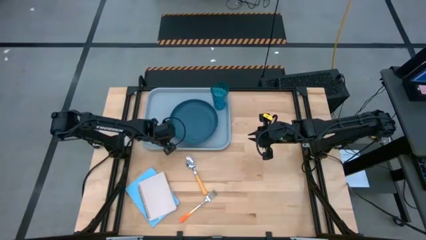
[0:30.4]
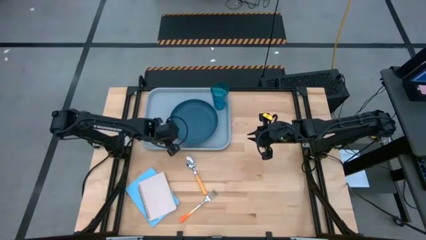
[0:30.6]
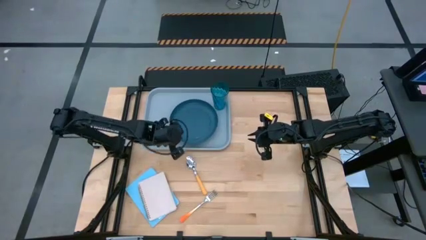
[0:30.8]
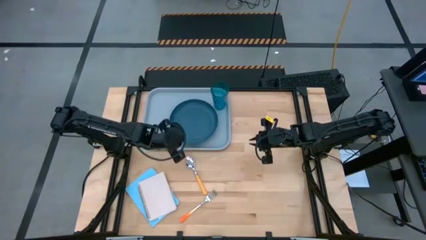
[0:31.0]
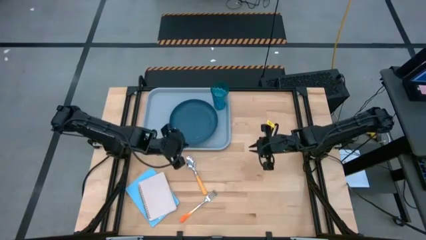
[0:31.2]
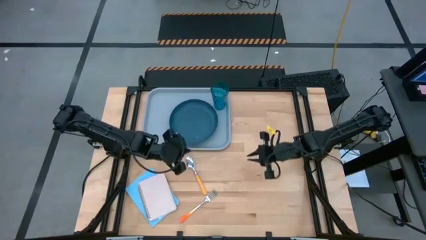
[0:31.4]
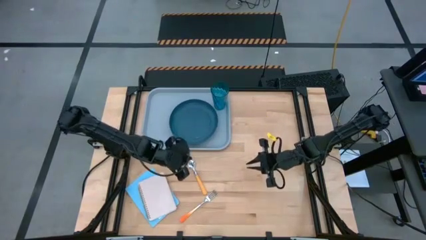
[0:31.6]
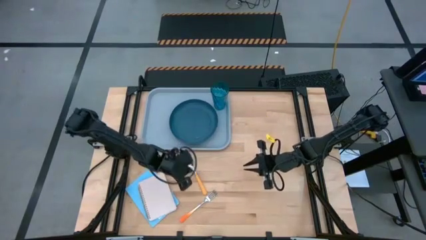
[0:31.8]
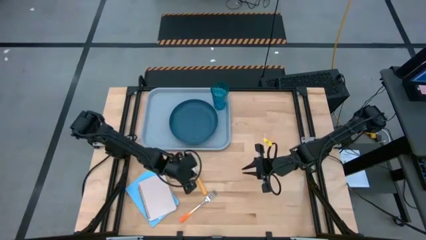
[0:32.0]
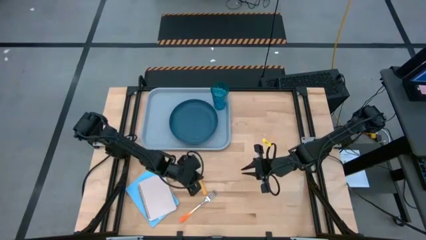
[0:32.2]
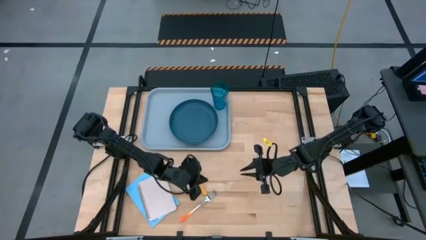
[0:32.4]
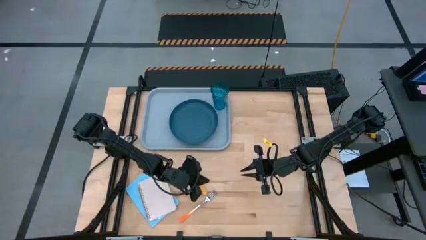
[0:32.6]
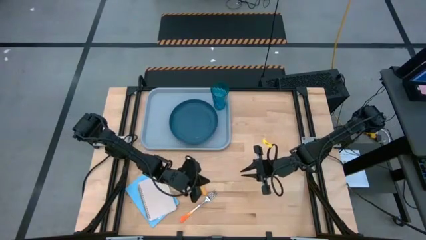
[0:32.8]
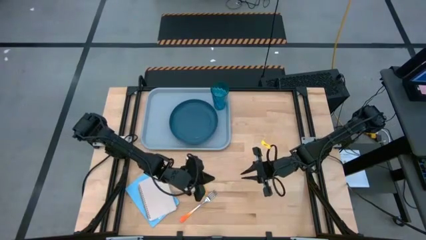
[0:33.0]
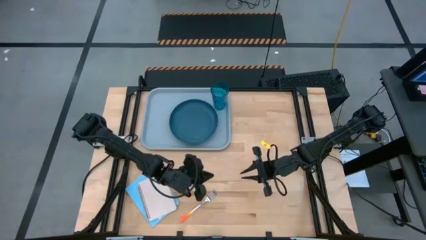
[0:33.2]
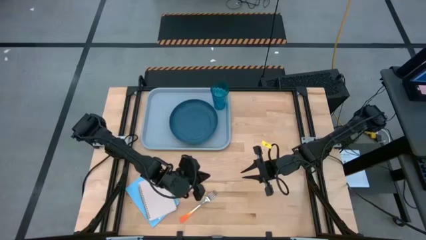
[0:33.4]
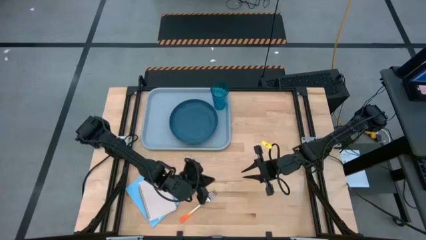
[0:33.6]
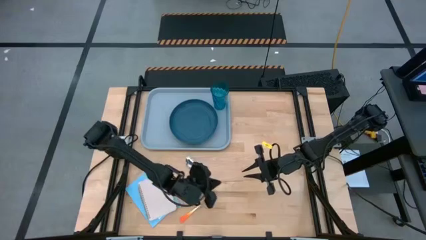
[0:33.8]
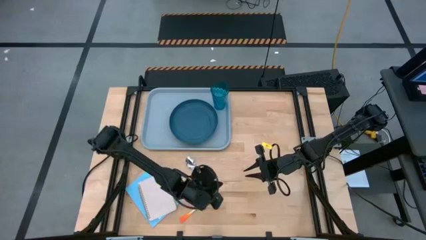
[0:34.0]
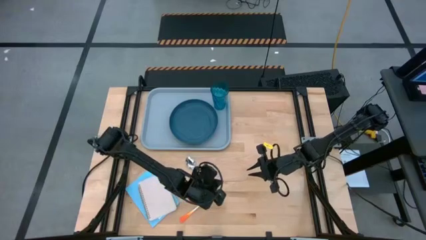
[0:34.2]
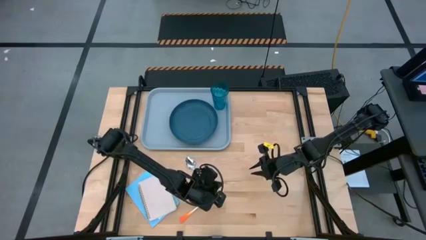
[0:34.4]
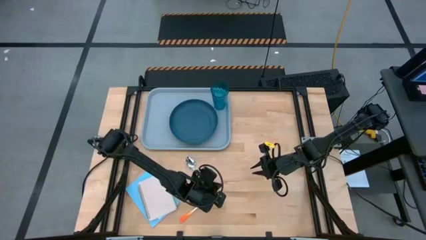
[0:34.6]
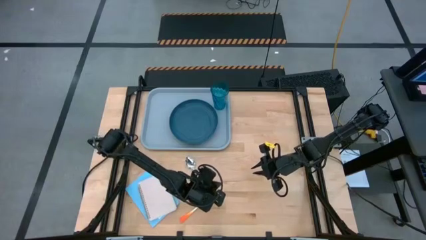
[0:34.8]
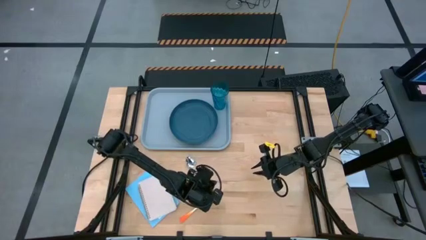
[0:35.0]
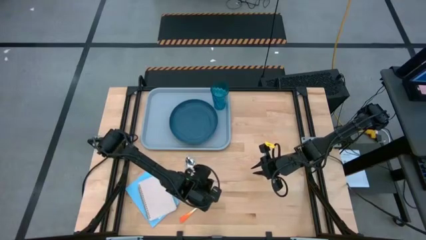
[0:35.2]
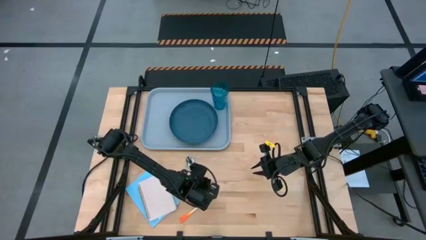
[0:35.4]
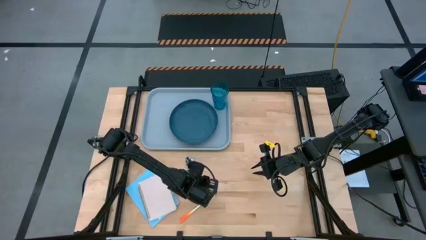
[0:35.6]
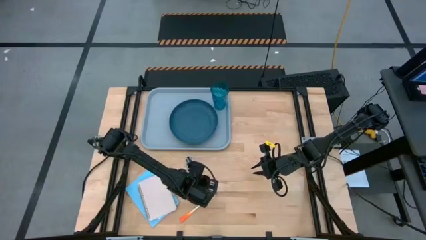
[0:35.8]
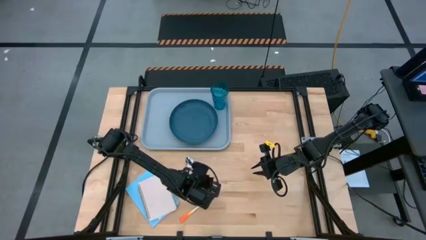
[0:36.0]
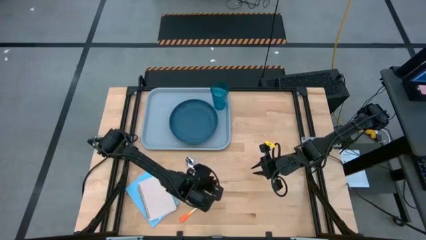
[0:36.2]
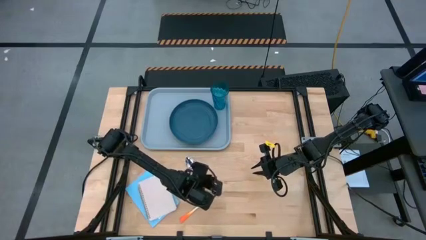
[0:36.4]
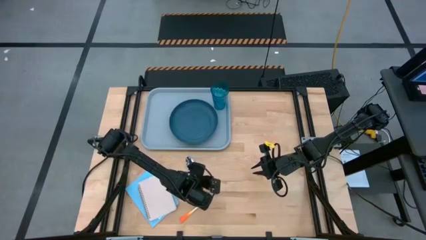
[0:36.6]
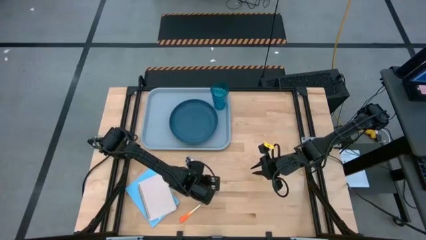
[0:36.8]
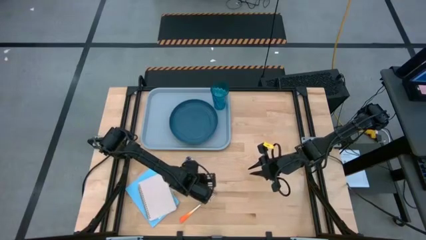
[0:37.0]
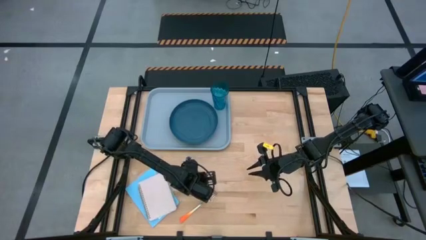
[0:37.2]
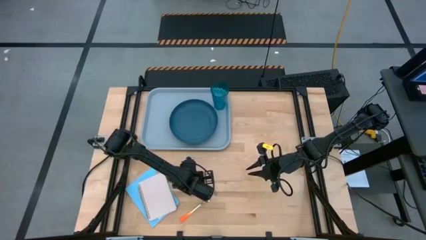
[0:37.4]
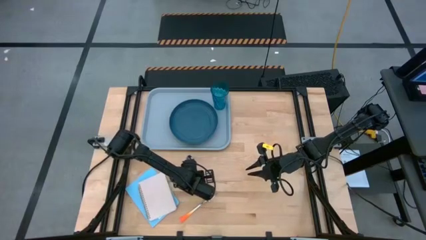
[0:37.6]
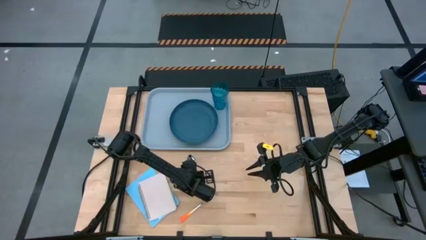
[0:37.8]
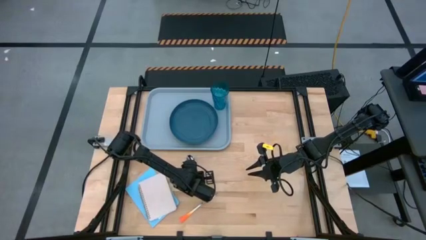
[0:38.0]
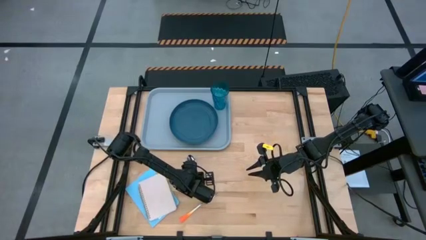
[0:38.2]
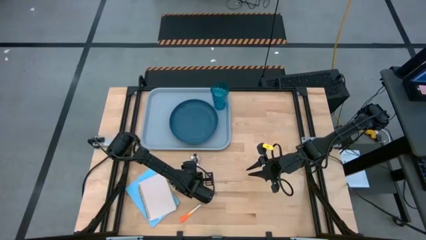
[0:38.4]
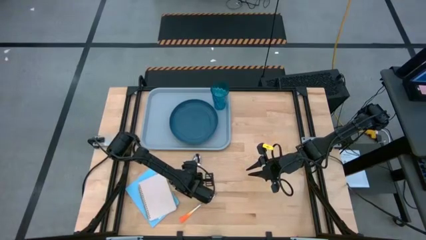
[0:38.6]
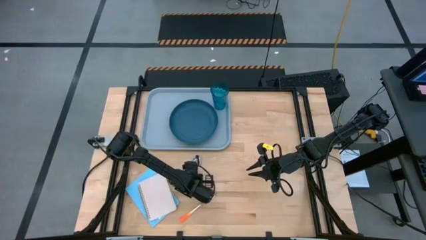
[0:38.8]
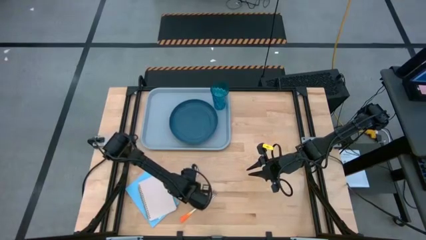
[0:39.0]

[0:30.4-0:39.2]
Task: Pick and place plate/cup/fork/spoon on tray
Put the yellow spoon on the light blue tray to the left of the blue plate

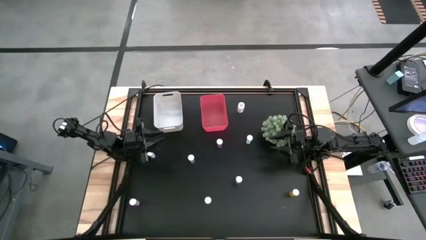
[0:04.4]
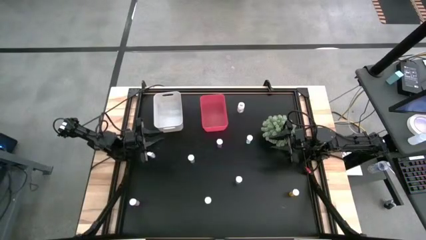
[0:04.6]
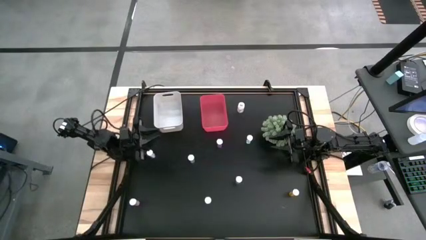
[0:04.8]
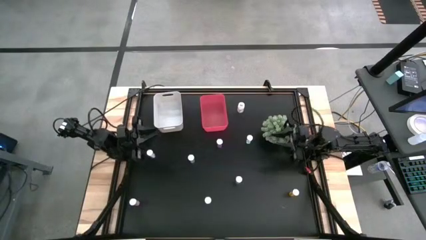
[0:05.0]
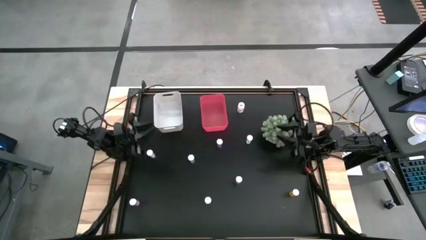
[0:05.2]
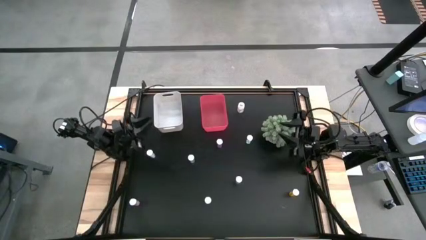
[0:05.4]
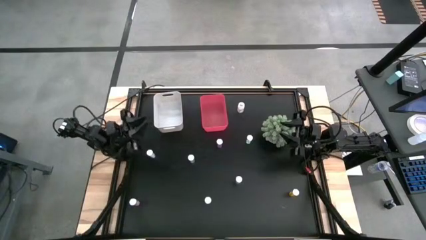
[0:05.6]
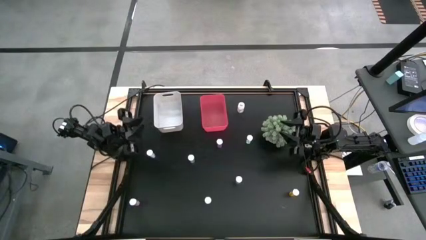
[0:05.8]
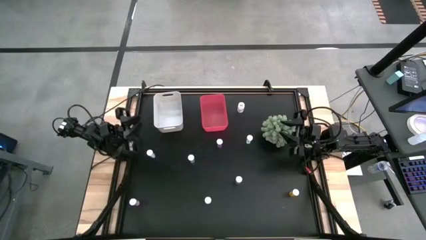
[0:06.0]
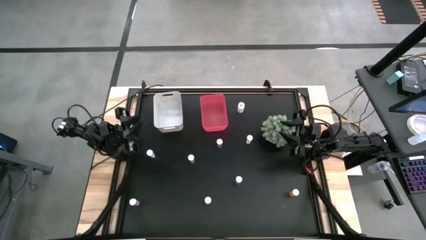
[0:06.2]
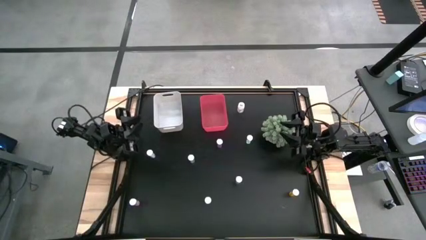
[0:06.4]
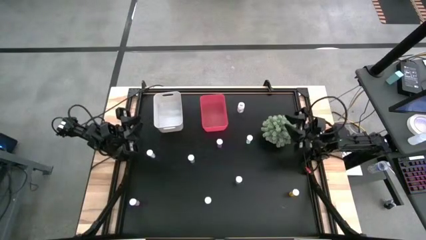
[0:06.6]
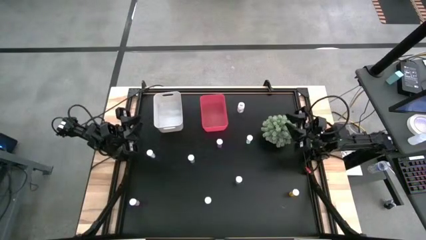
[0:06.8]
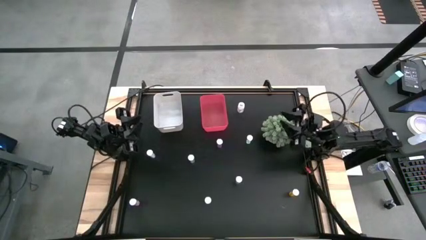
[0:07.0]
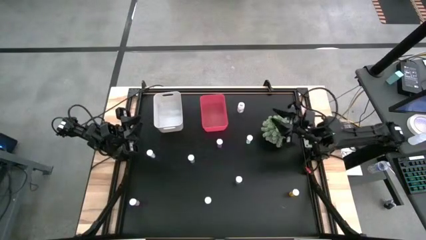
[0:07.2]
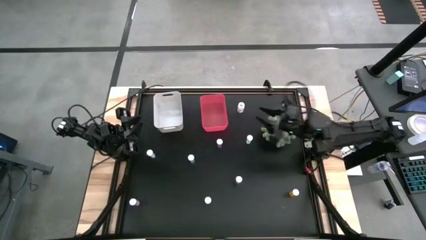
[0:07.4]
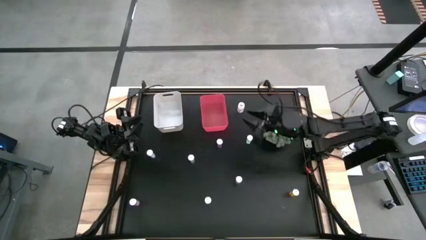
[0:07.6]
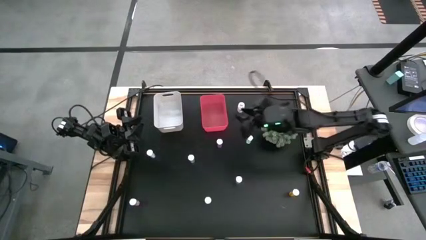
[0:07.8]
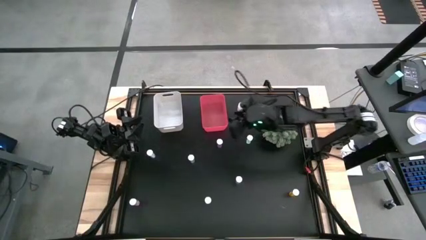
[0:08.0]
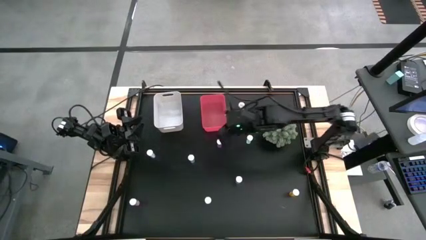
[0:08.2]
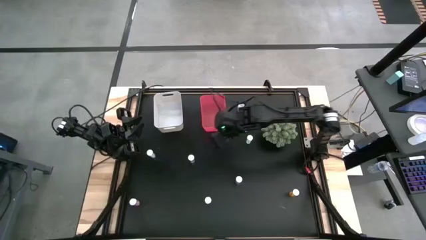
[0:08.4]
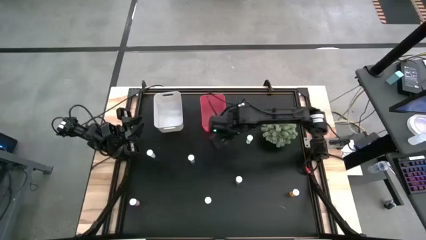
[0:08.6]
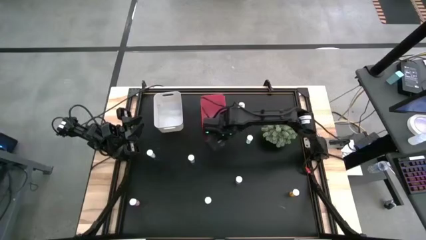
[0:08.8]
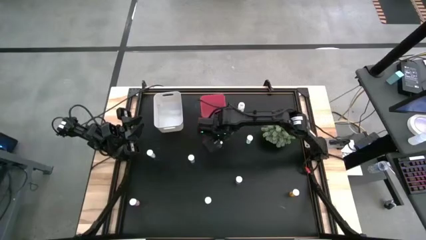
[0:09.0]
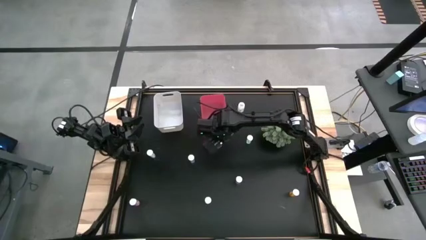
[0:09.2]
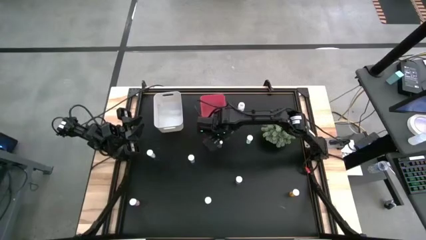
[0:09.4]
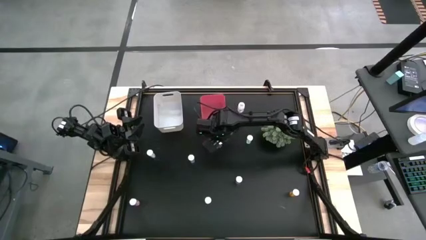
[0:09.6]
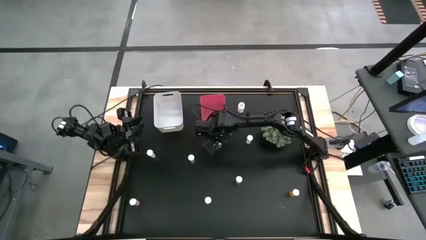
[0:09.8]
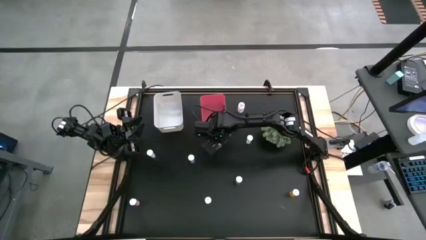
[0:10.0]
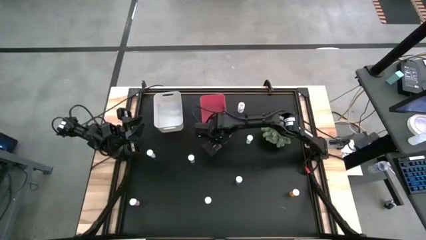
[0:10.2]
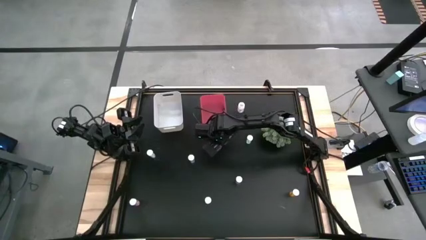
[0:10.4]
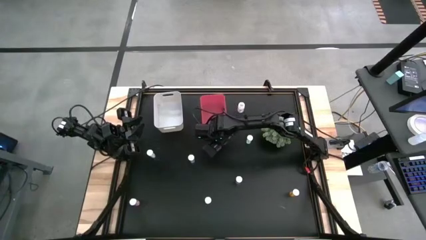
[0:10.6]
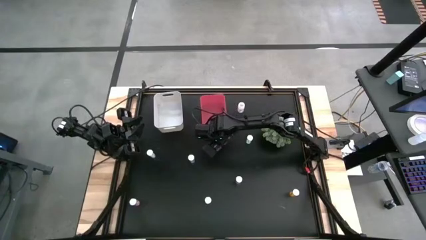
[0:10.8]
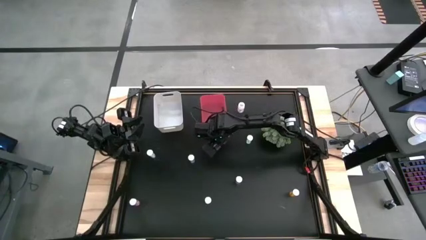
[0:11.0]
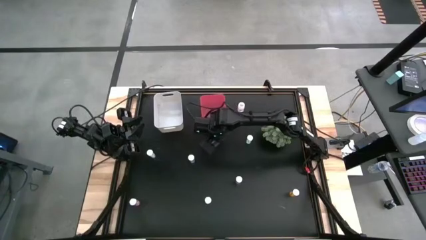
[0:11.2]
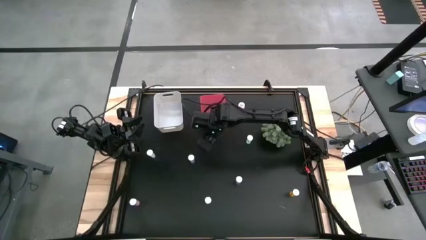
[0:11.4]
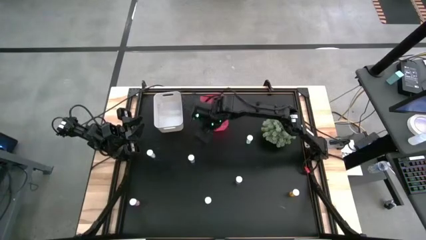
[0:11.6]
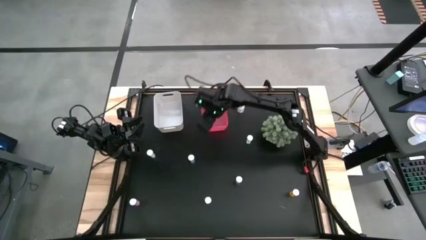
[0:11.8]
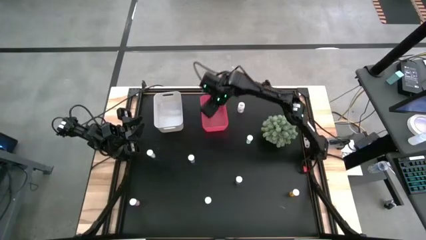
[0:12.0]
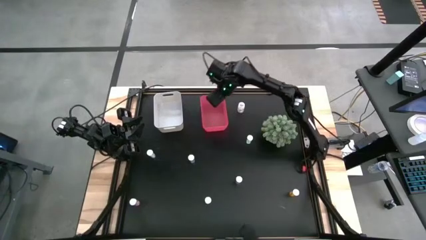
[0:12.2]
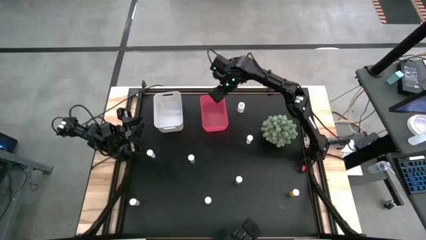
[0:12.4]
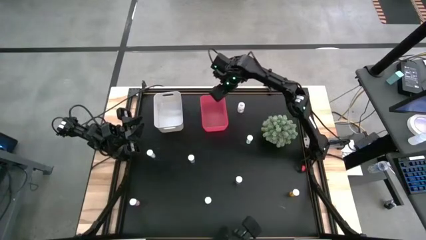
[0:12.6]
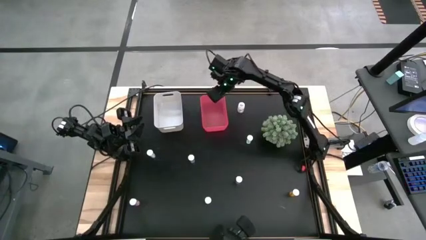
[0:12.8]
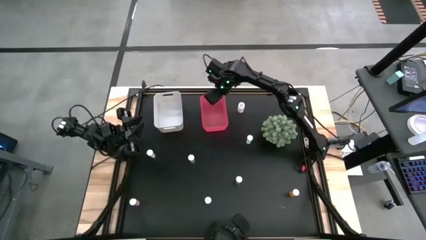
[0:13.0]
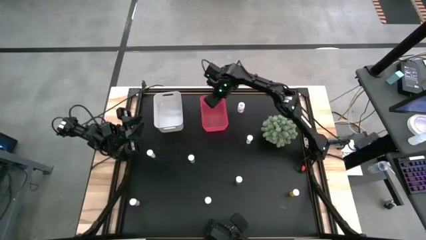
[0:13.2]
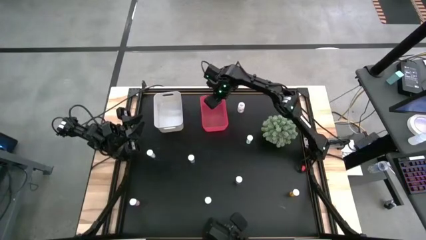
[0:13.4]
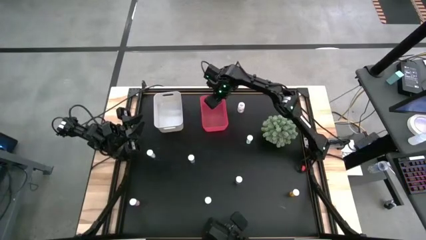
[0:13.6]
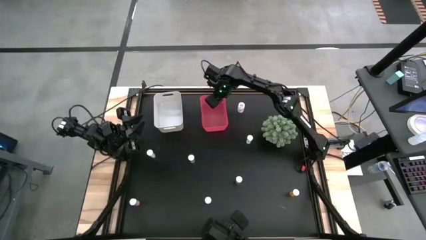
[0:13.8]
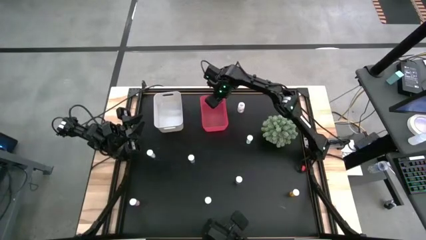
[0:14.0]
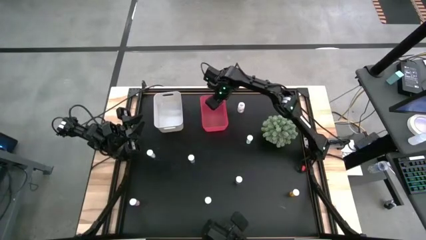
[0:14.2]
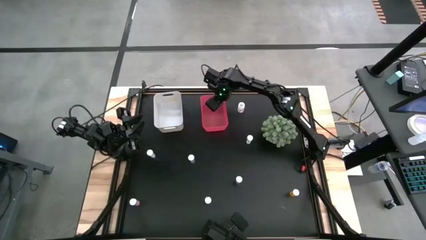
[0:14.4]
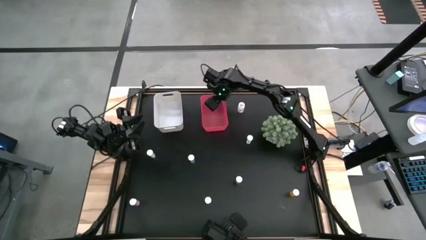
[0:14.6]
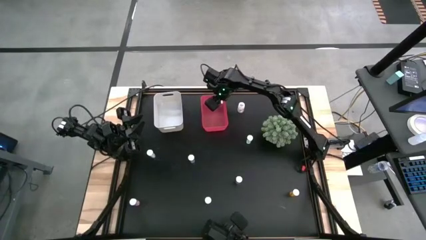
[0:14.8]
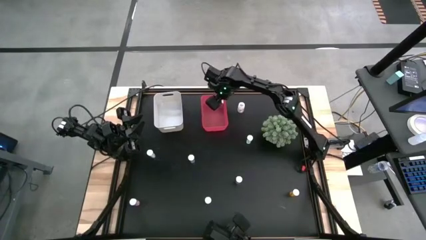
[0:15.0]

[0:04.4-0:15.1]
Task: Pick and place medicine bottles into bin by pill shape (circle, oval)
Put the blue capsule bottle into the pink bin
